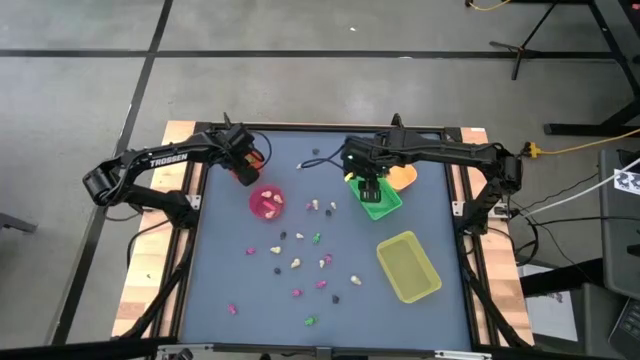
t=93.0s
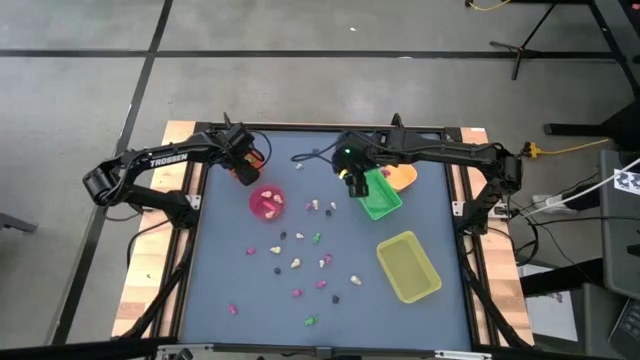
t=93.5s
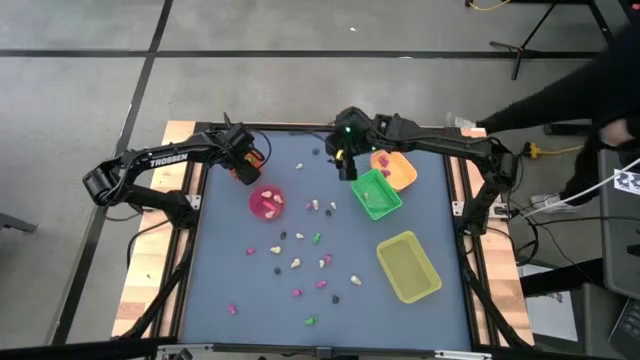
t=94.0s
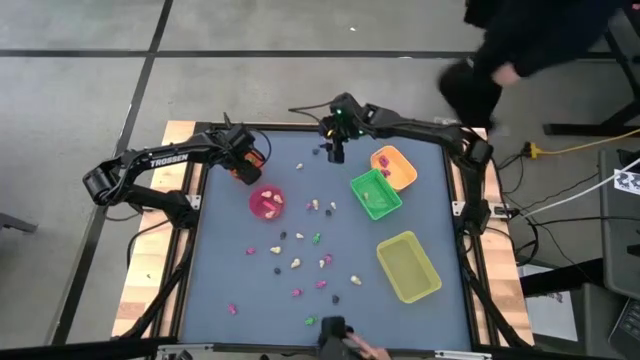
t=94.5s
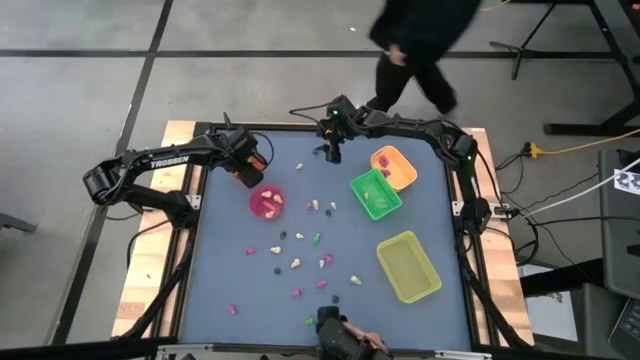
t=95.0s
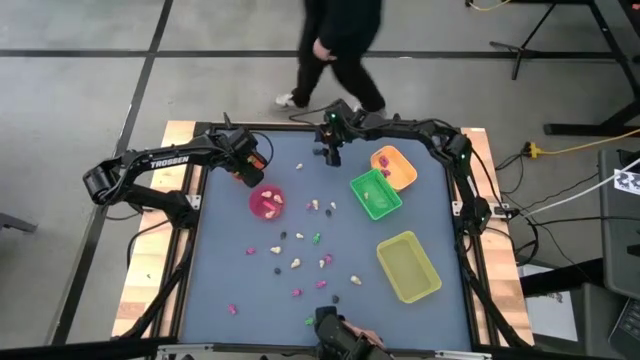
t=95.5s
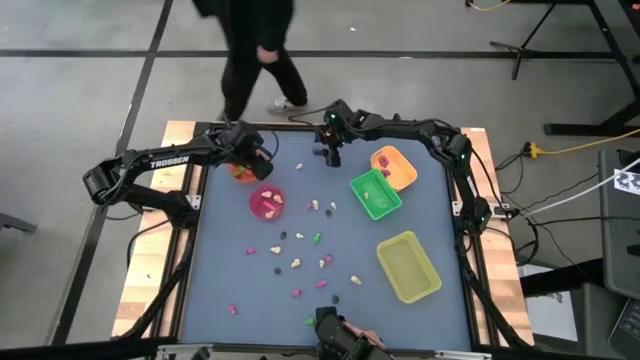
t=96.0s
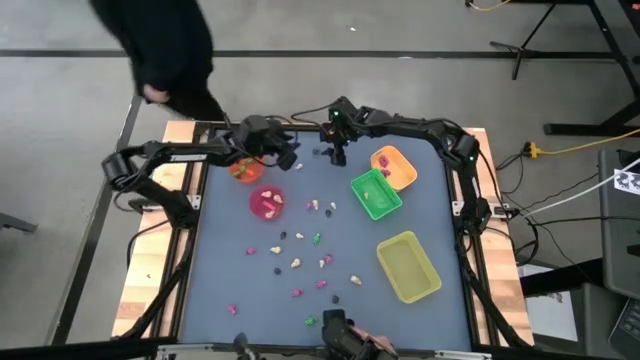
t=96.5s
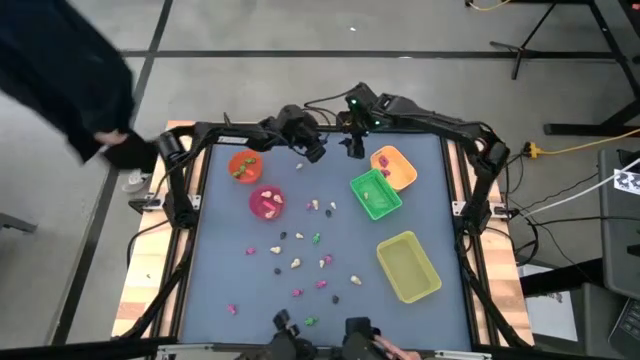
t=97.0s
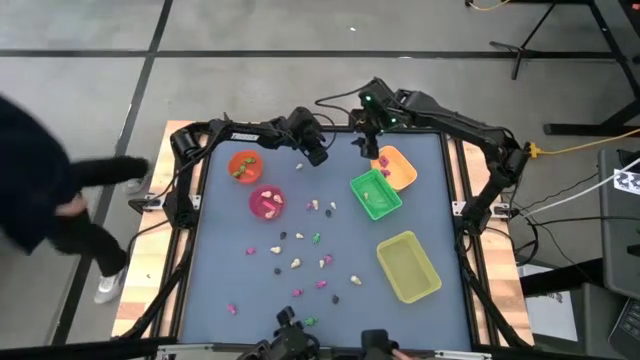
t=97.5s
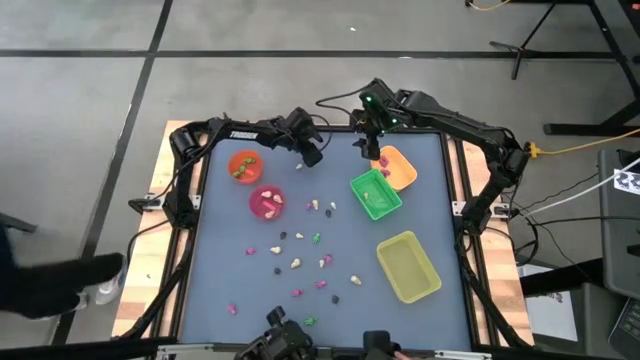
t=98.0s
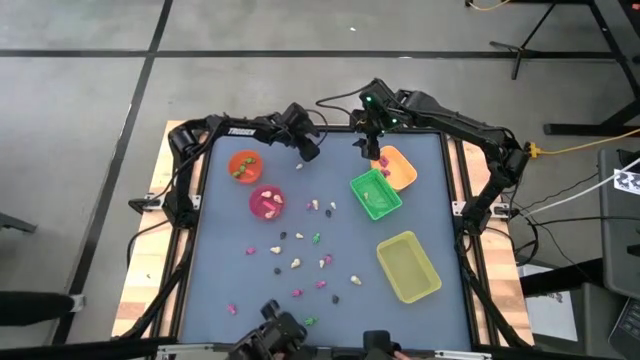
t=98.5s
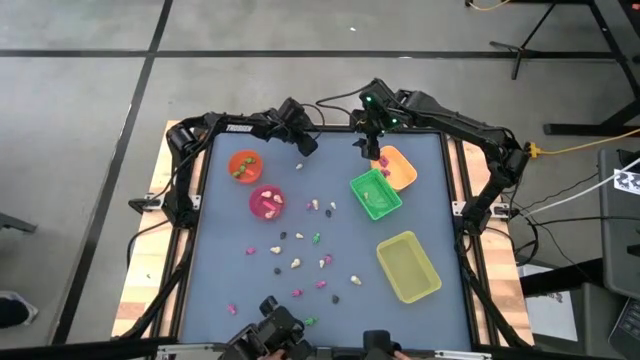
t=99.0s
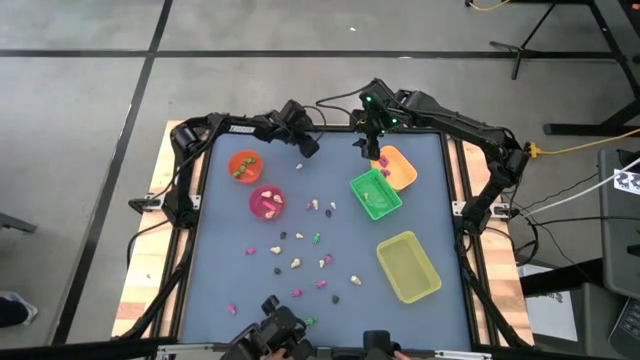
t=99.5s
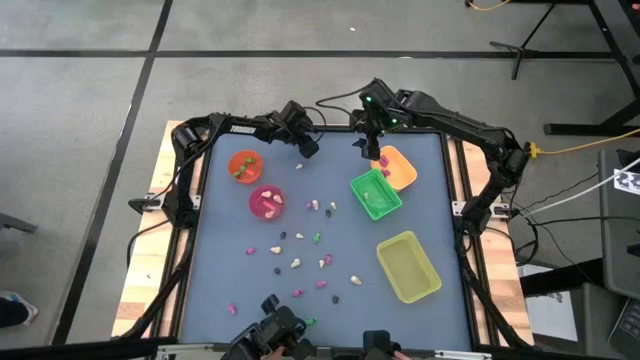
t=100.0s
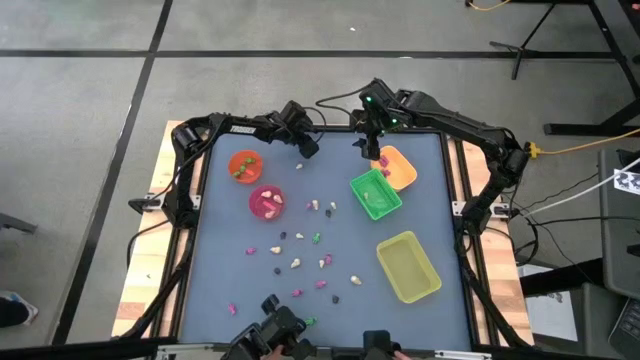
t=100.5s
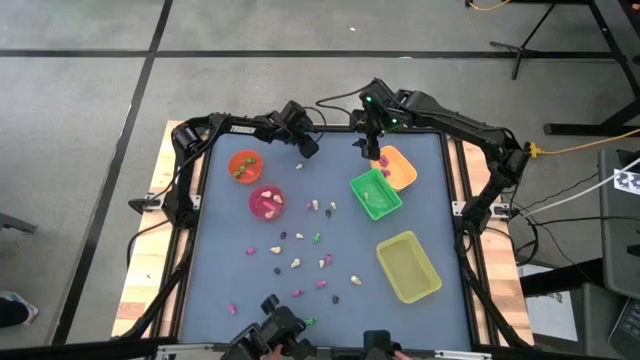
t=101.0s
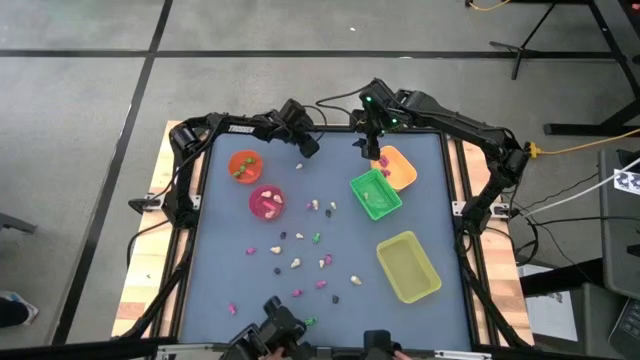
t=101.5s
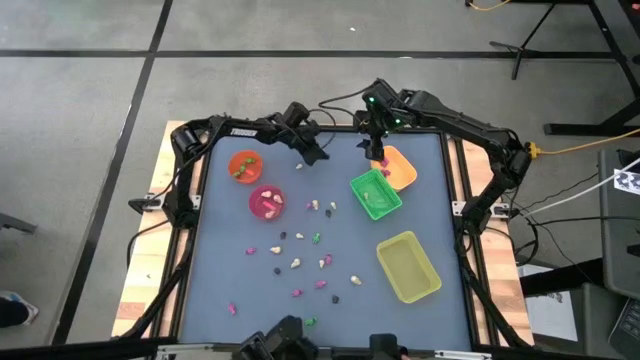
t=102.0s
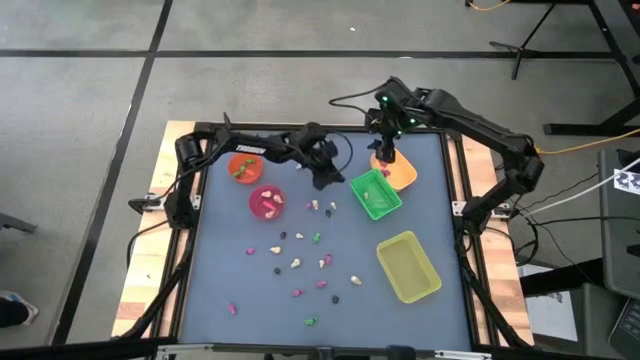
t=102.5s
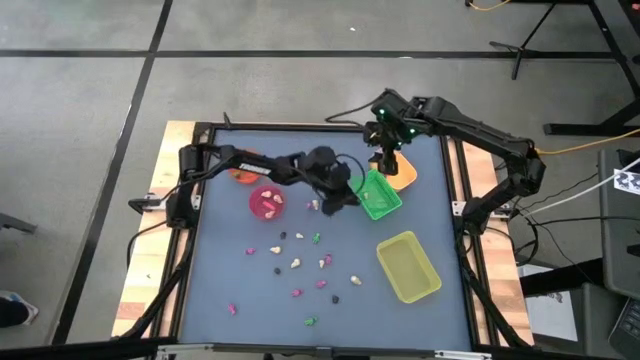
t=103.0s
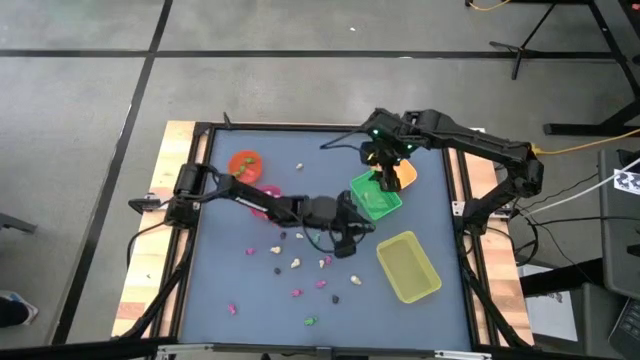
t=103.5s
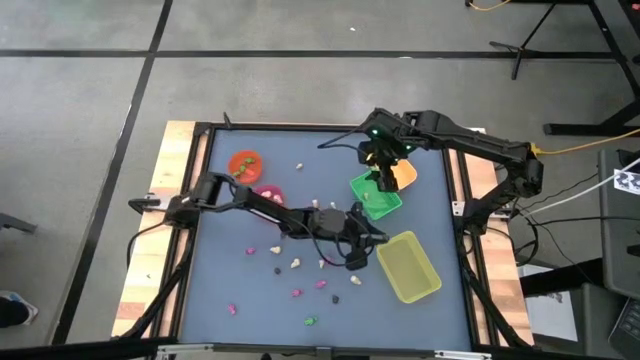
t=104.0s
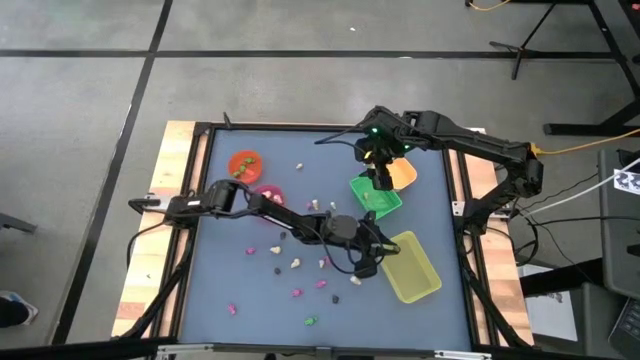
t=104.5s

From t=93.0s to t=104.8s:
Task: Sort Halloween decoration
Put the black skull toy into the light yellow bin

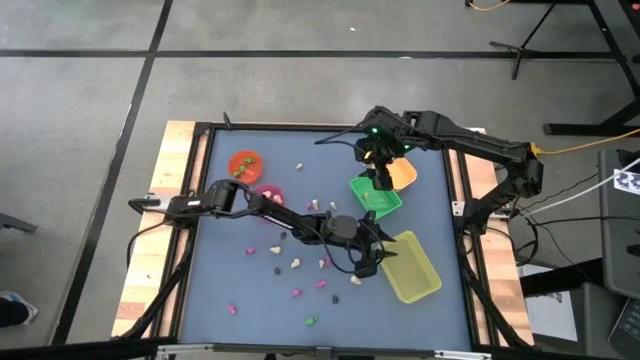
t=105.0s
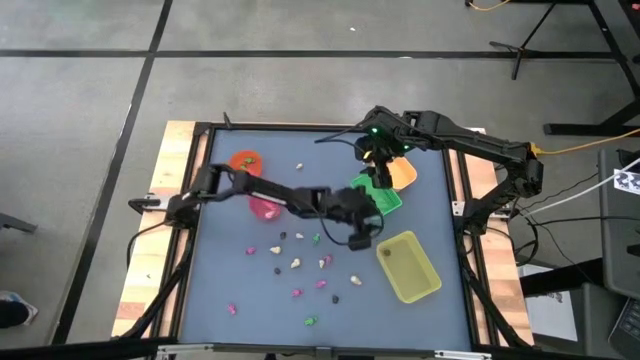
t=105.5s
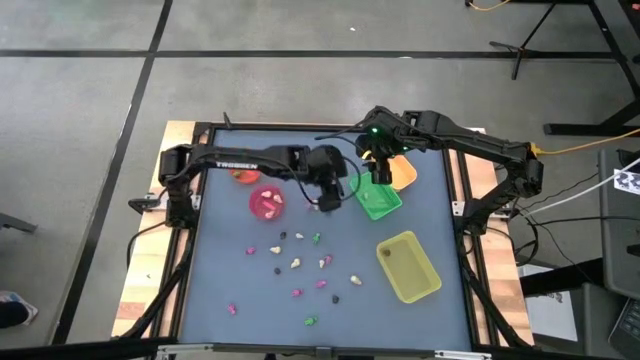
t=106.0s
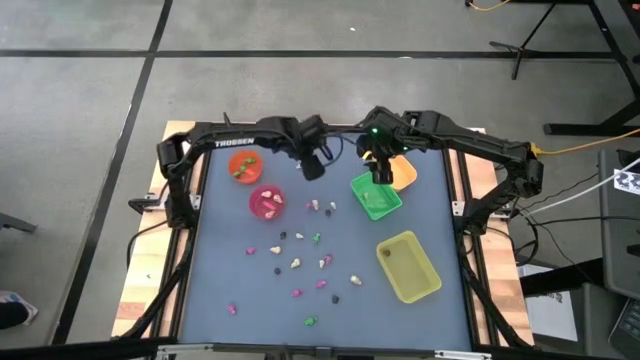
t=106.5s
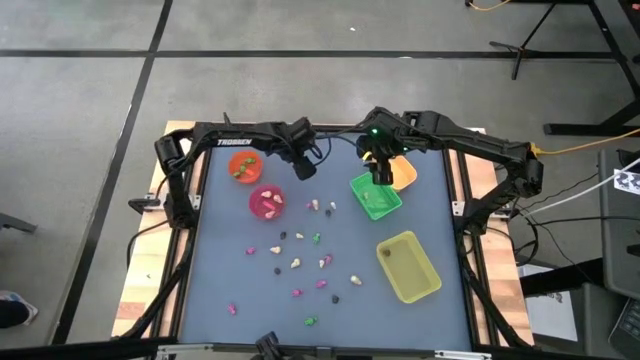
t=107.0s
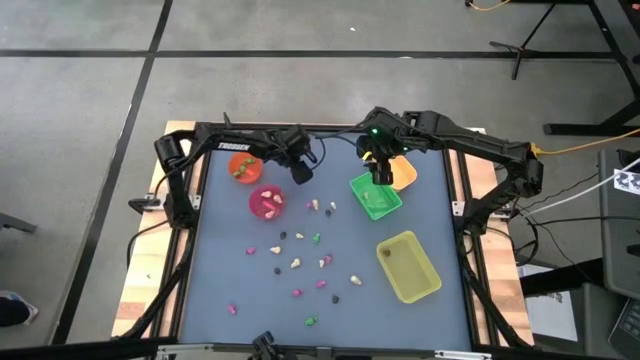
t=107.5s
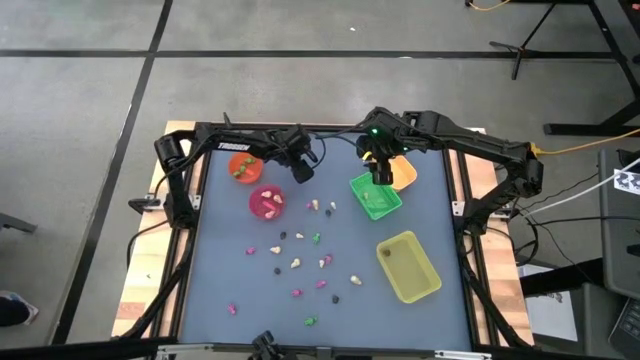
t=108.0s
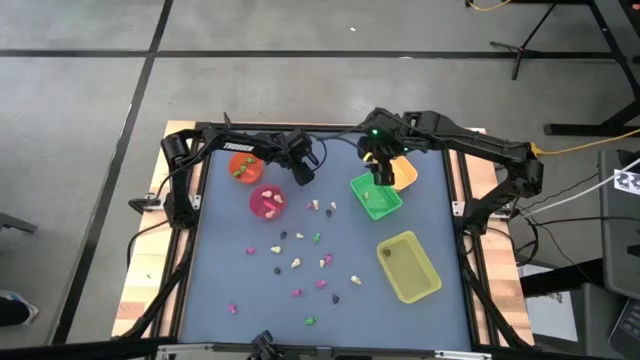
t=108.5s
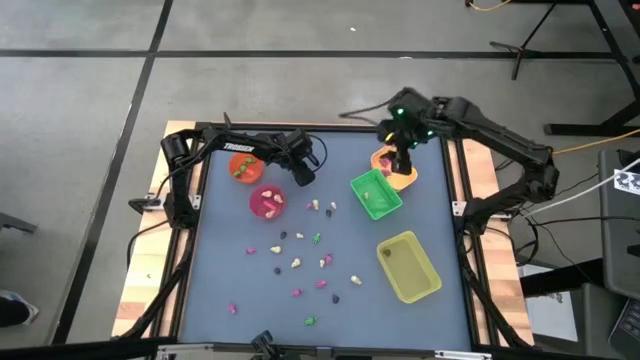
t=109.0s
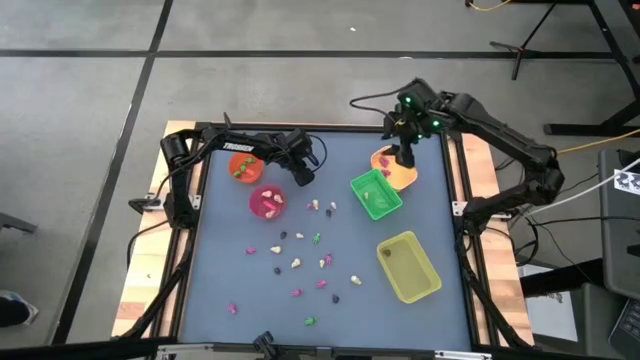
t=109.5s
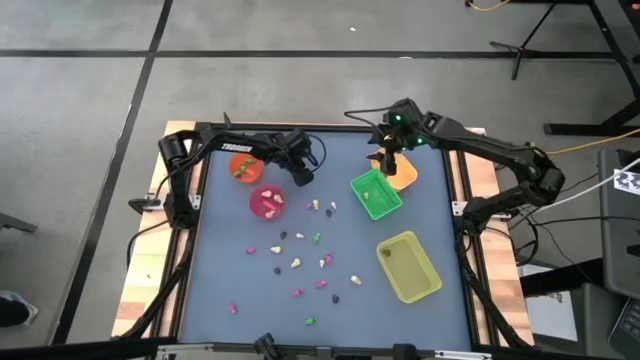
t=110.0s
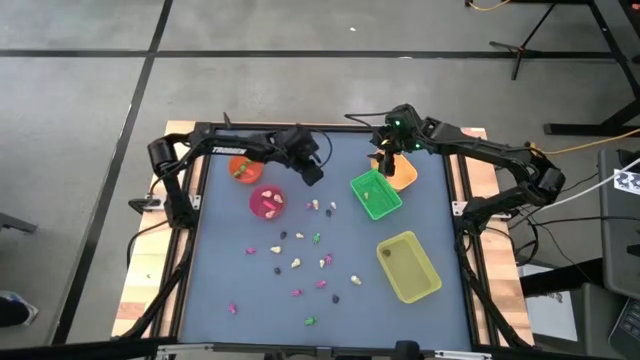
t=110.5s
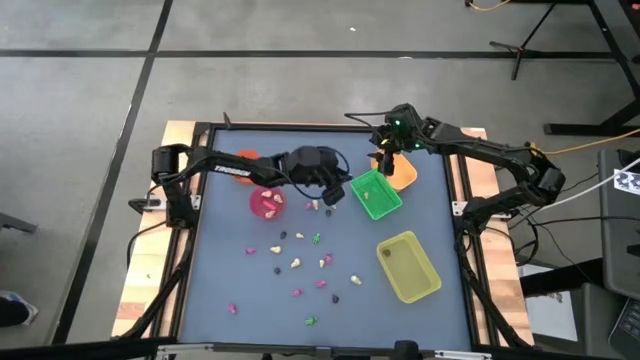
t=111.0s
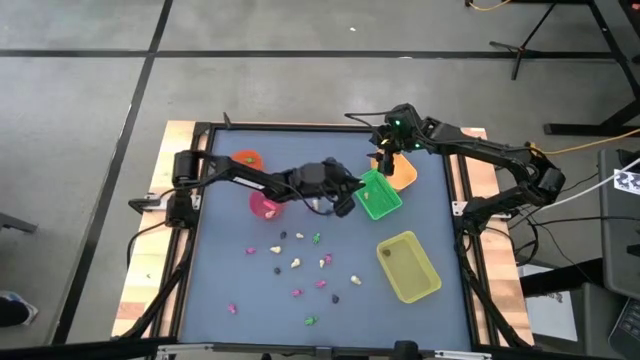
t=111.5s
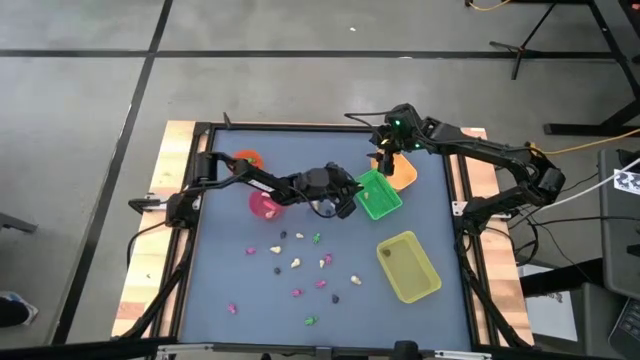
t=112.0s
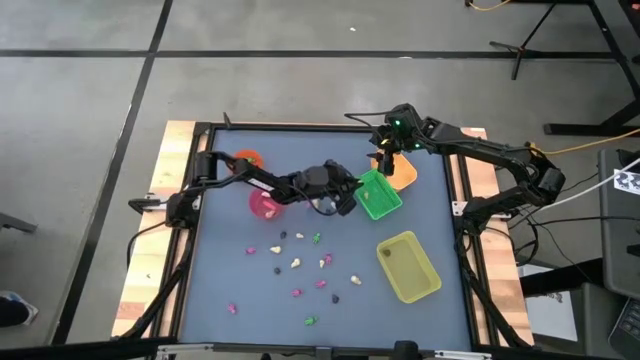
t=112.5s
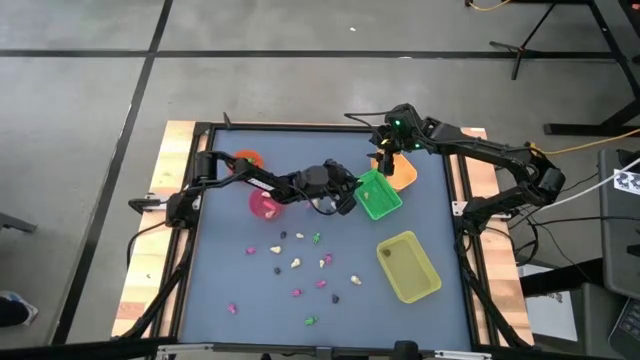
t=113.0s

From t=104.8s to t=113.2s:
Put the white skull toy into the green bin

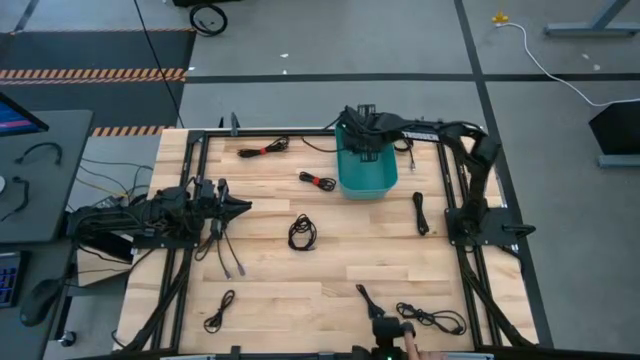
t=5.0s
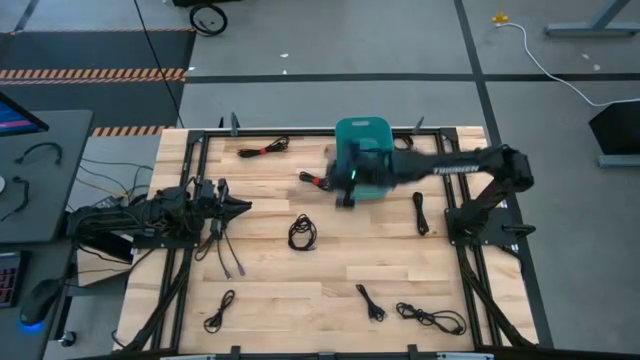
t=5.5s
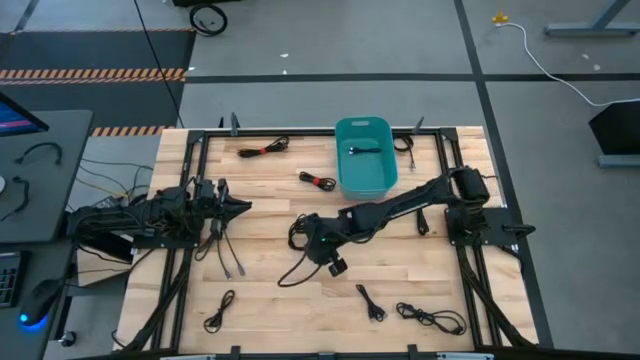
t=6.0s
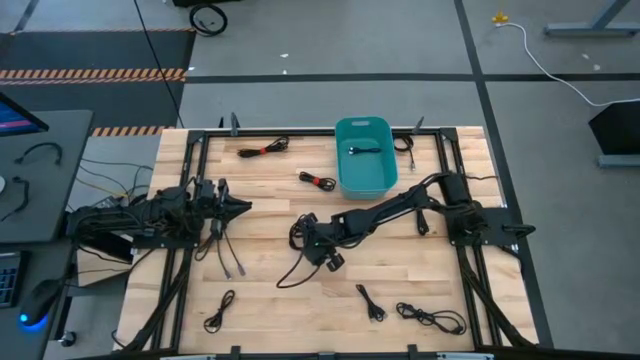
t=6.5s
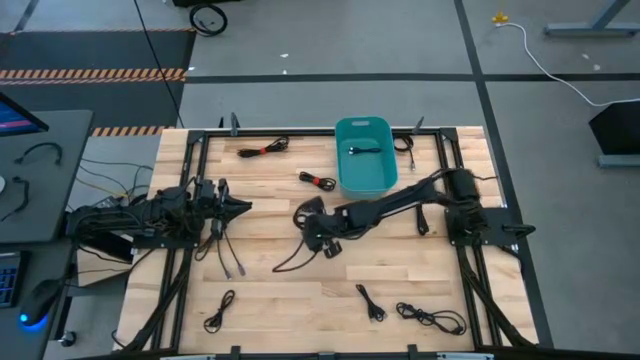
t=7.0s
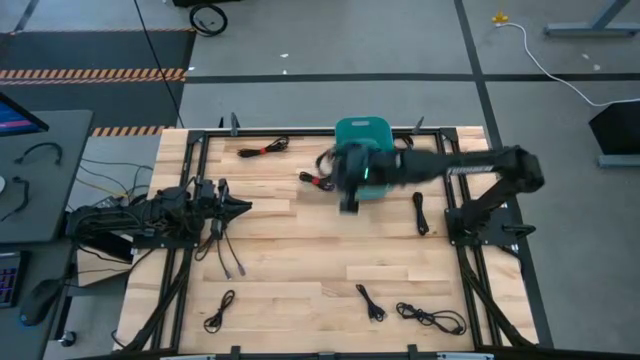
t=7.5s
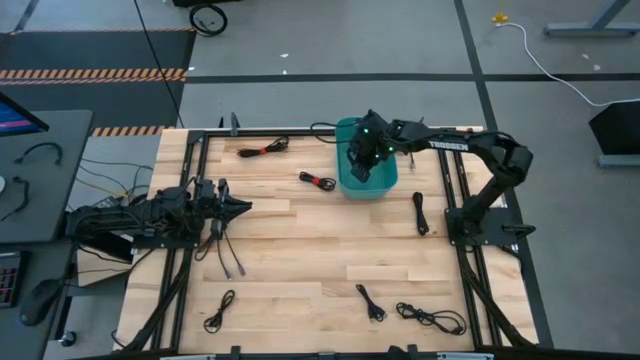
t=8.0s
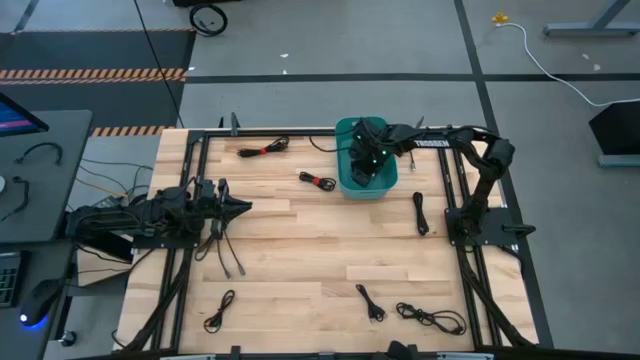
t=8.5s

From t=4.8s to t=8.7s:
Task: Pick and place USB-C Cables
Put the black charger cable into the green bin
